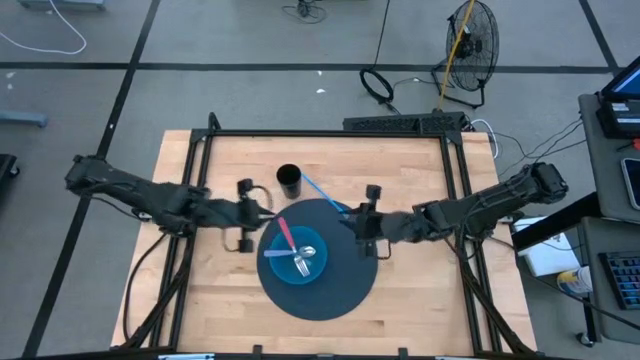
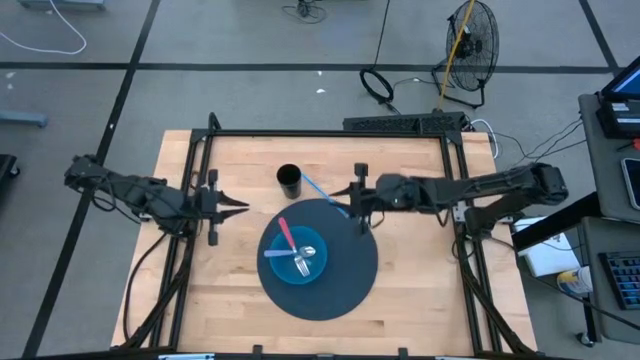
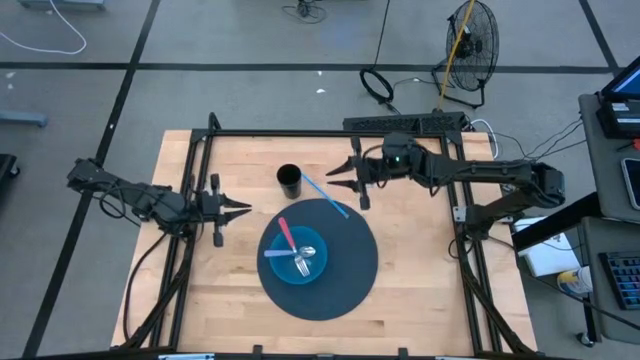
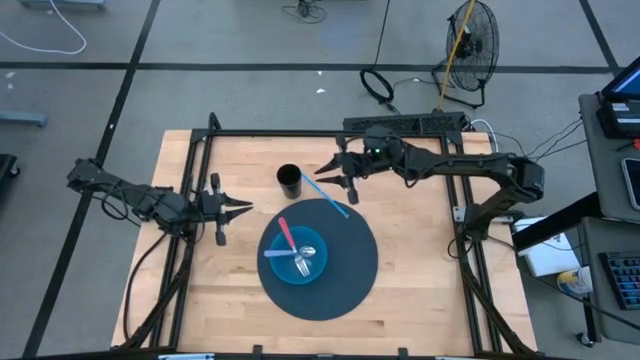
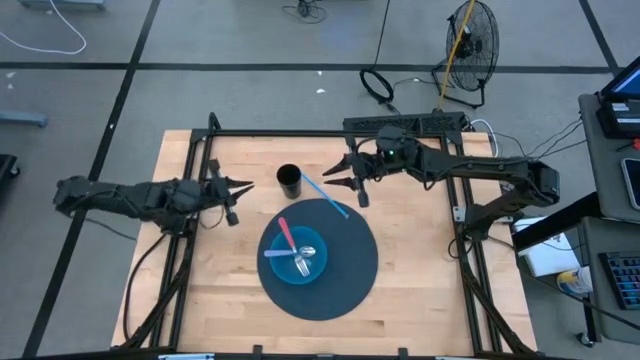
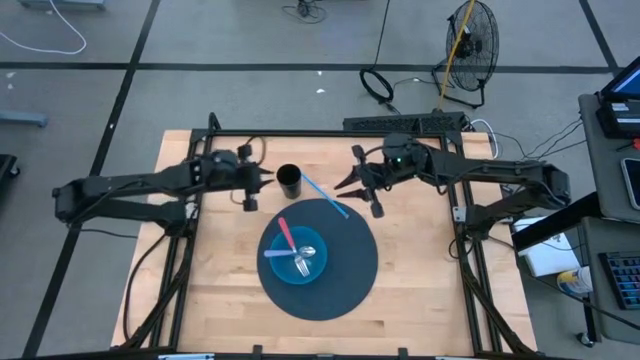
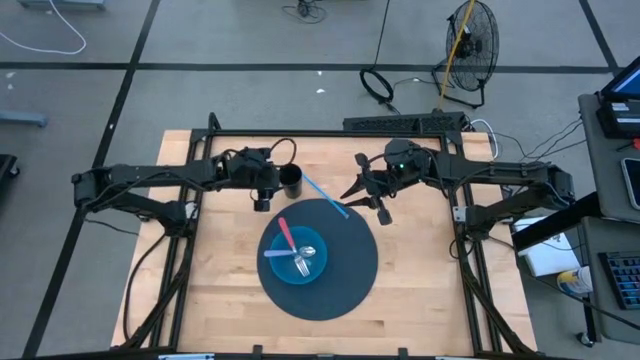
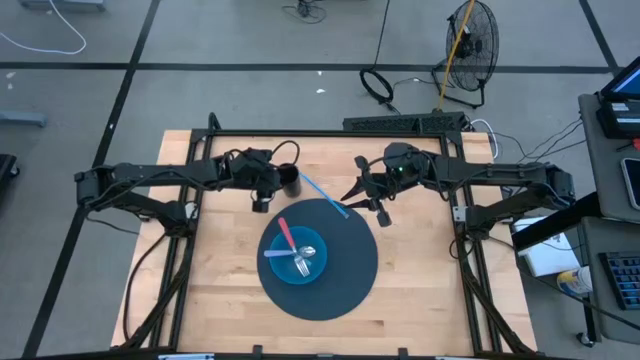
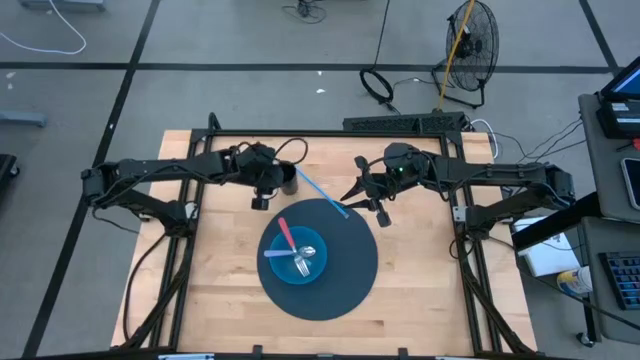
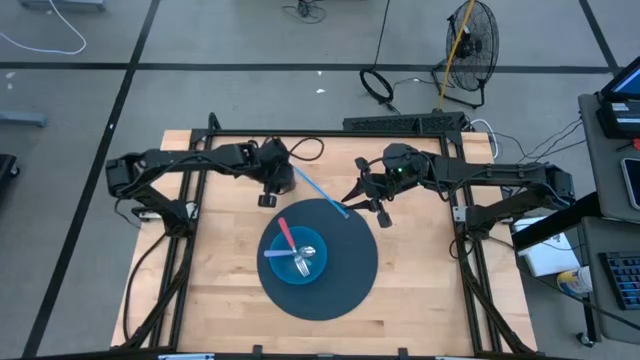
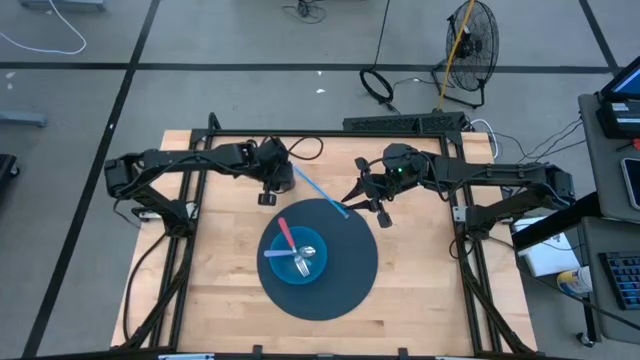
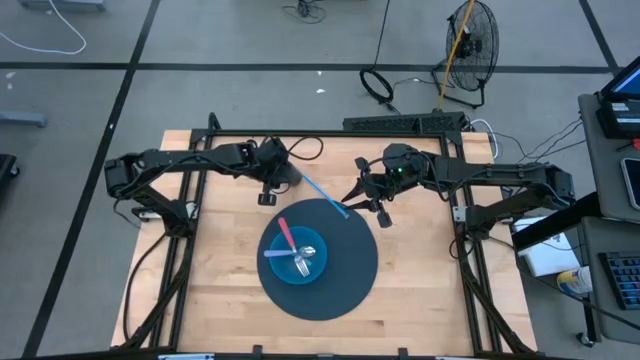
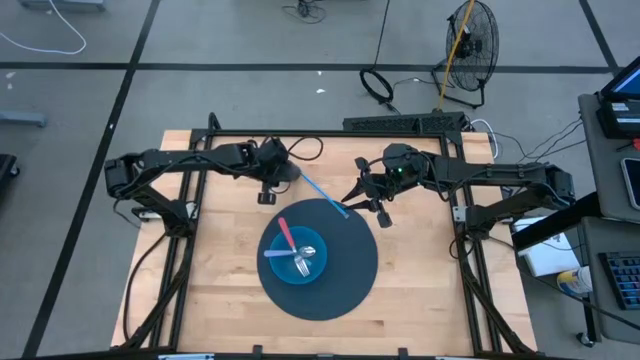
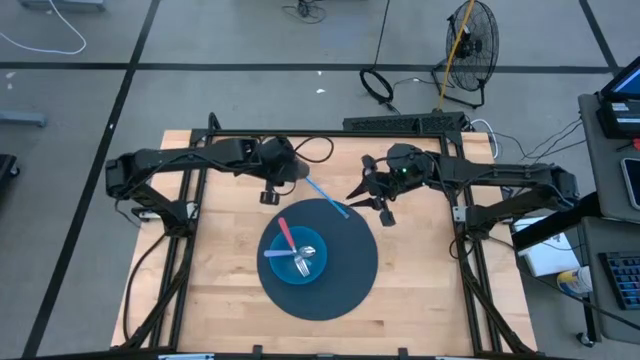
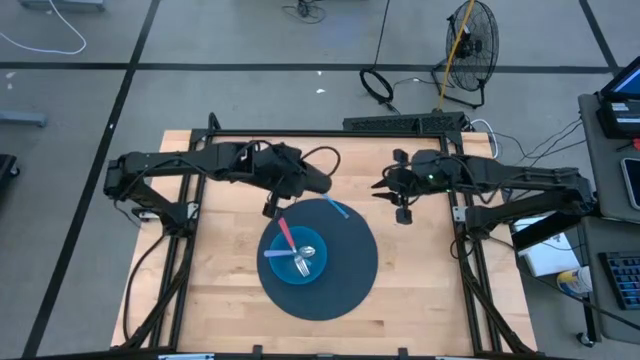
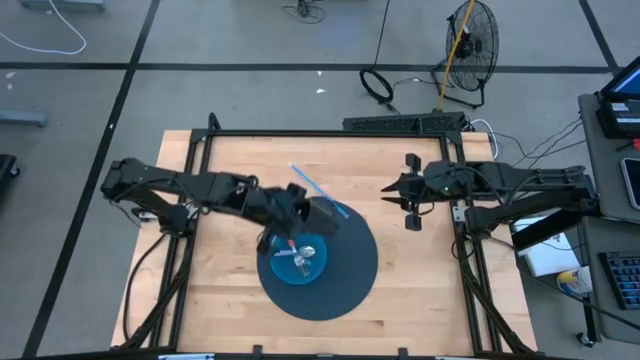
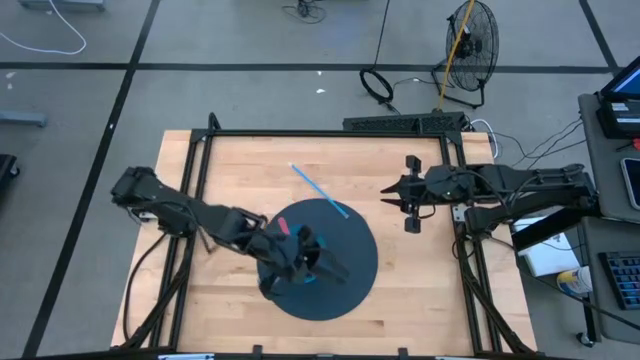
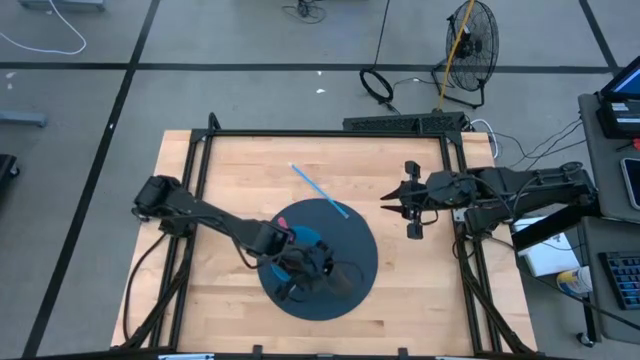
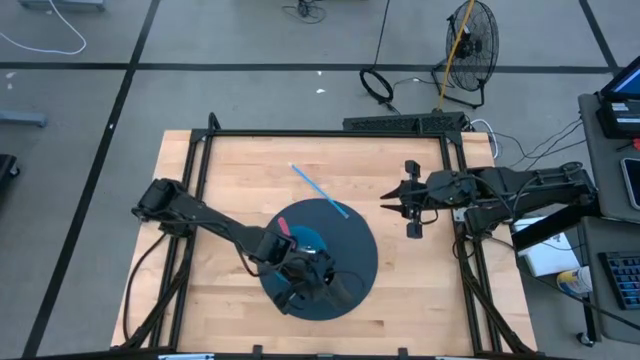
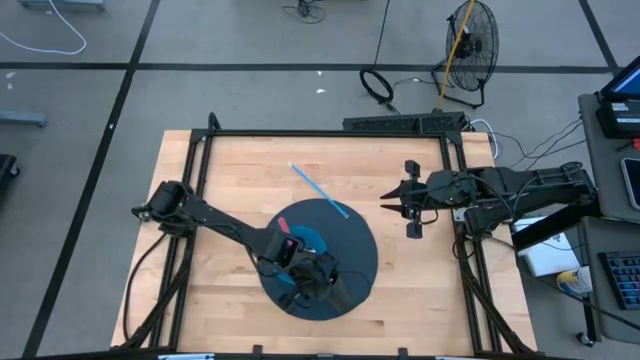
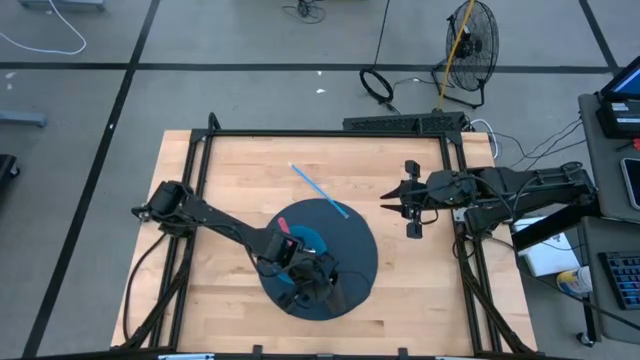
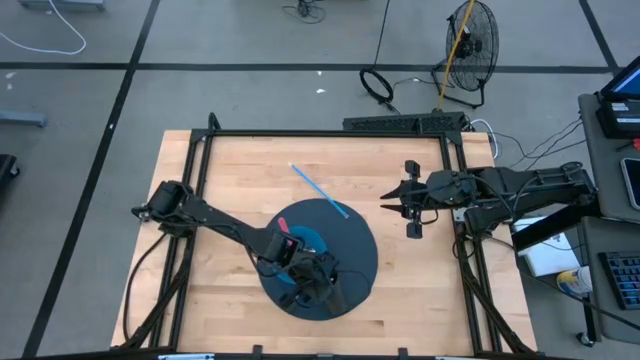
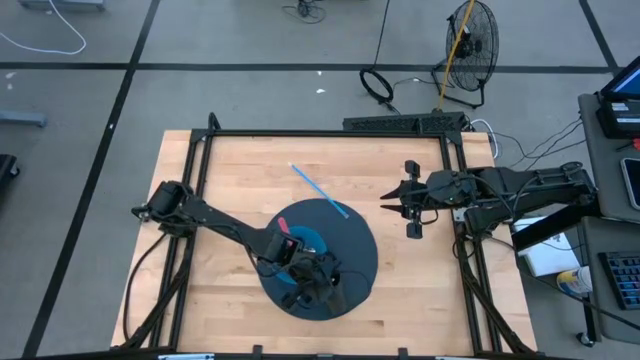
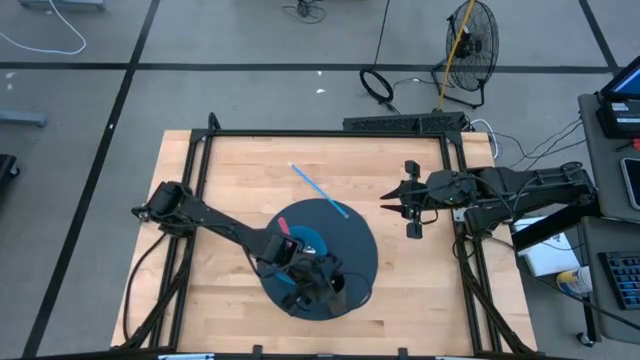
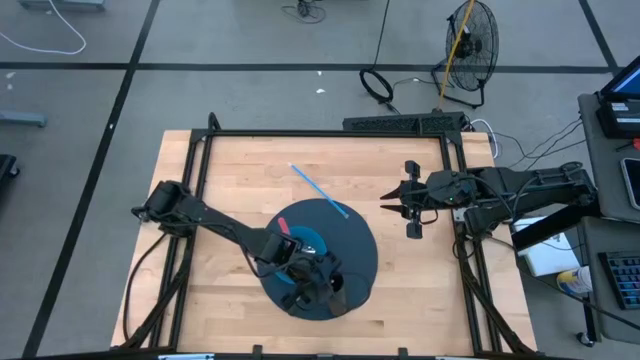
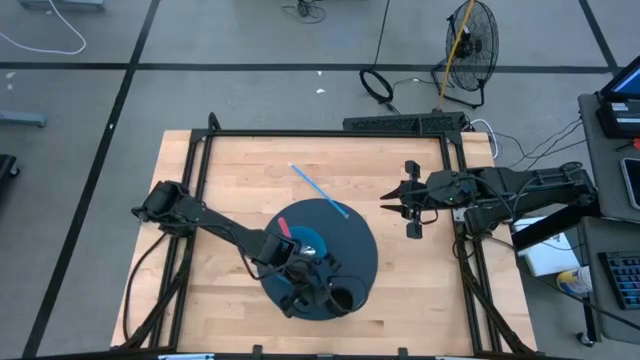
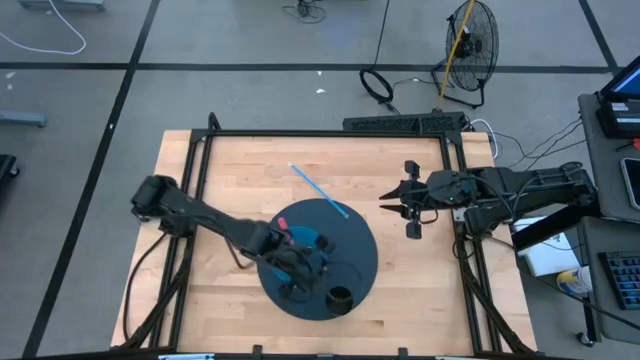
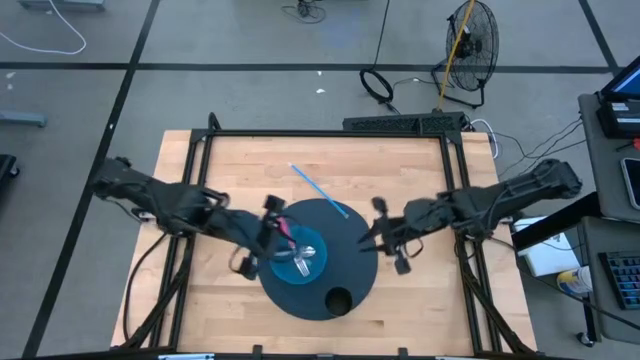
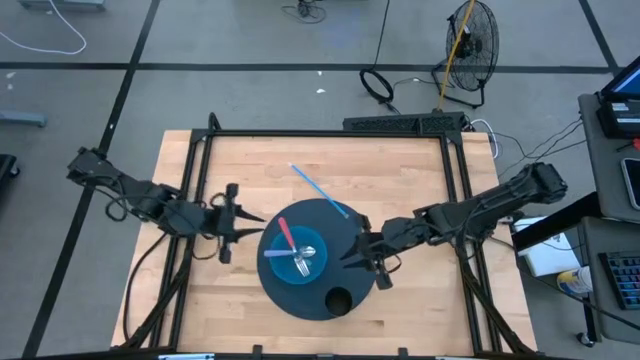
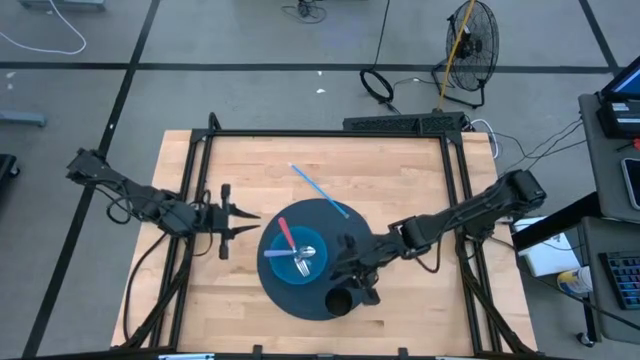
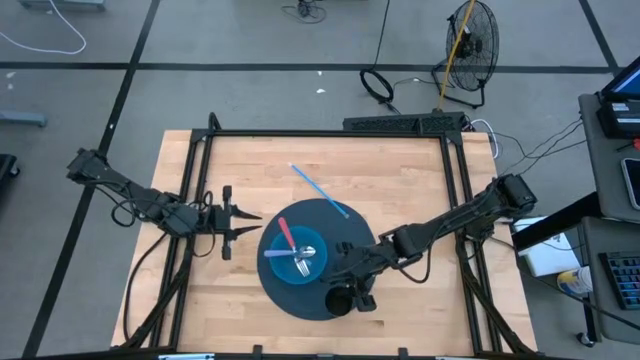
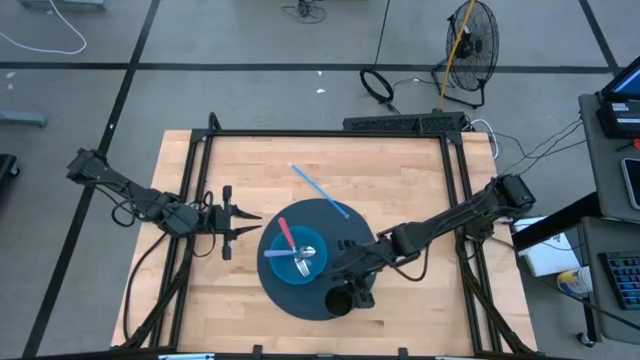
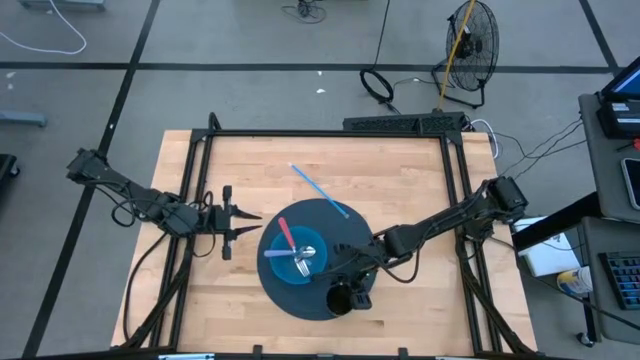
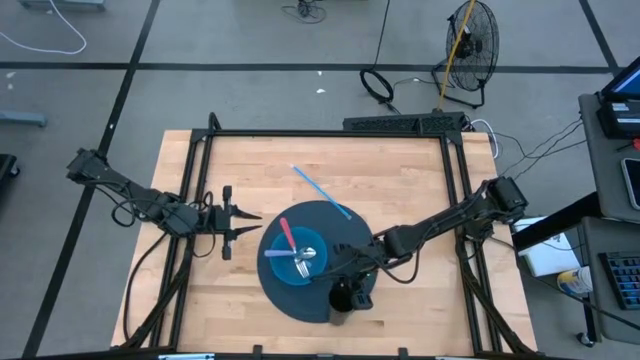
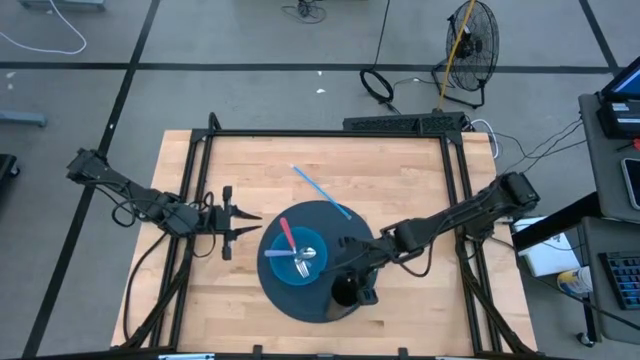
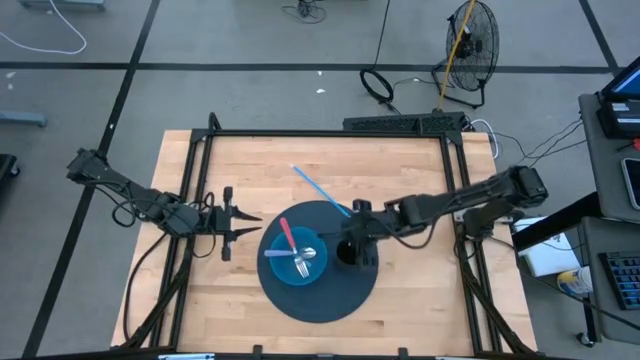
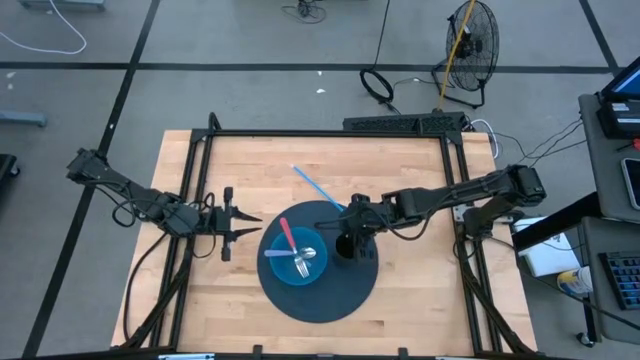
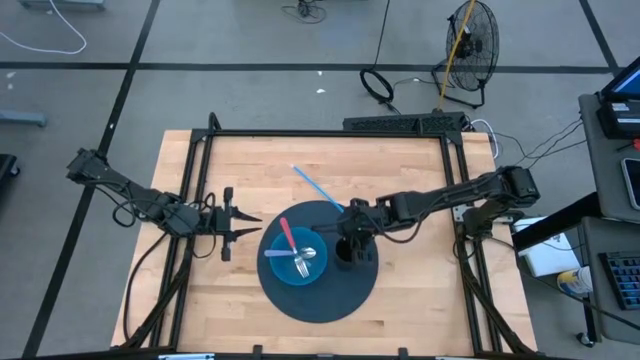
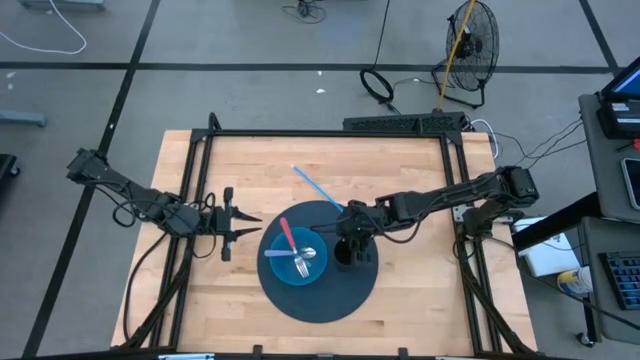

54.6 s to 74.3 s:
Task: Pick & Place Utensil
Put the black cup to the right of the blue bowl on the blue mat
